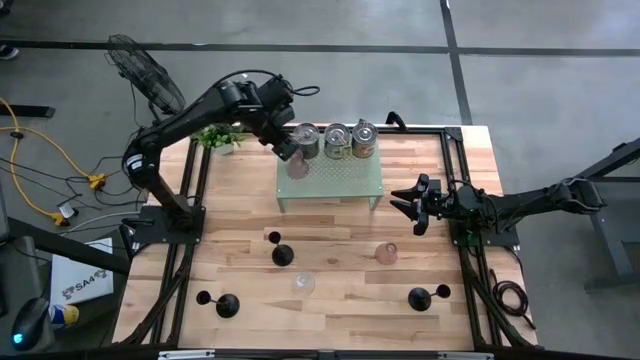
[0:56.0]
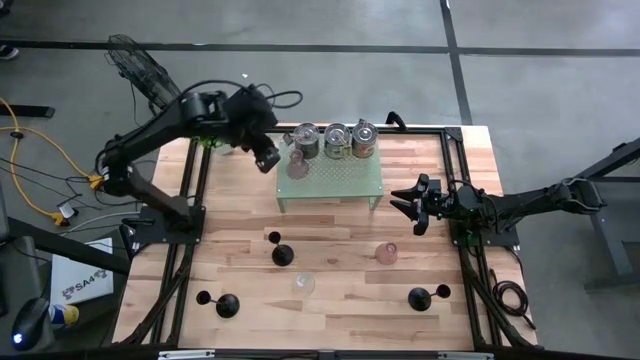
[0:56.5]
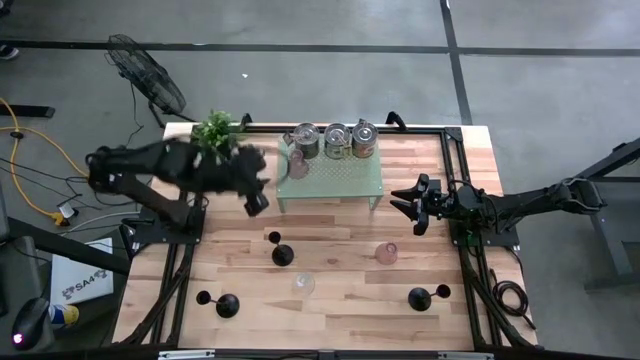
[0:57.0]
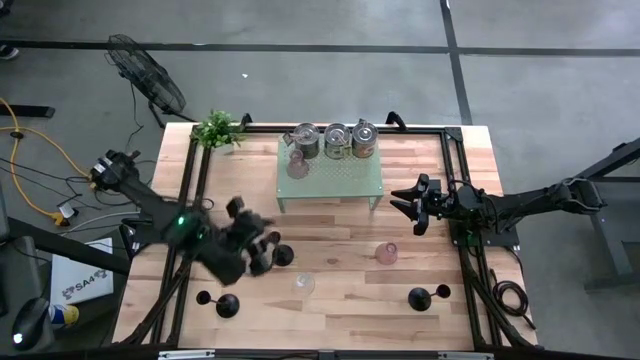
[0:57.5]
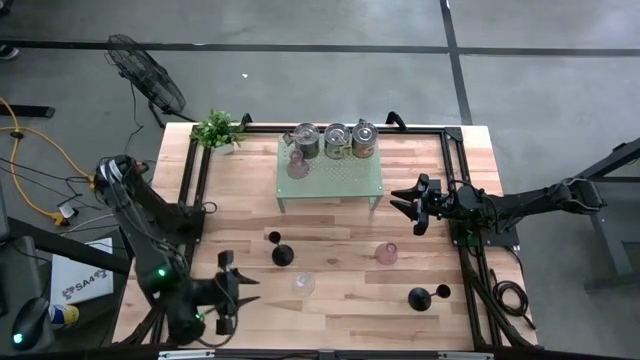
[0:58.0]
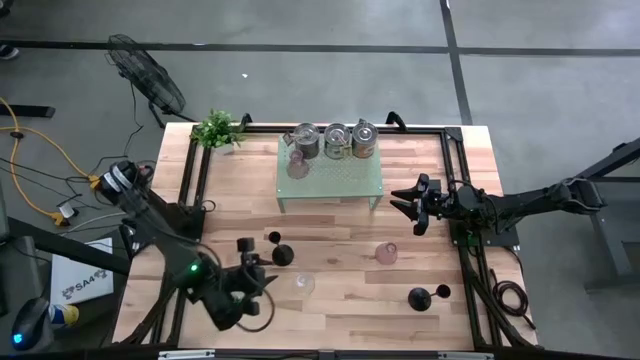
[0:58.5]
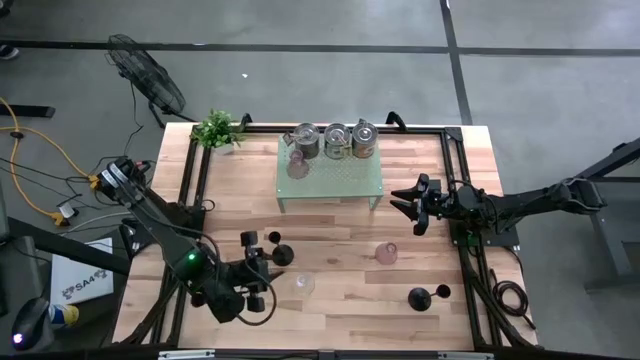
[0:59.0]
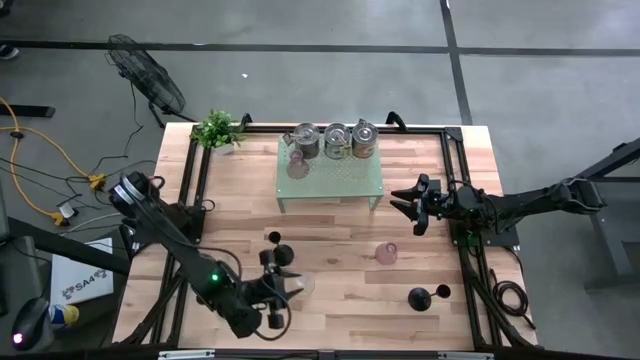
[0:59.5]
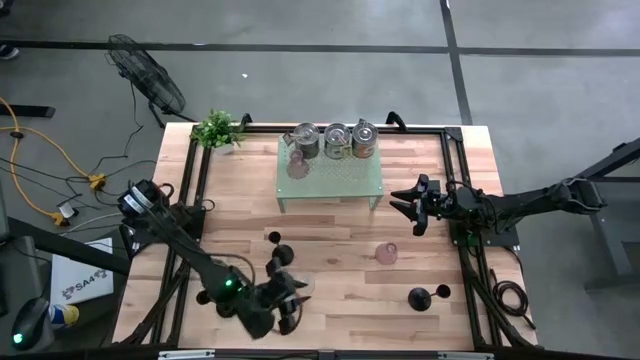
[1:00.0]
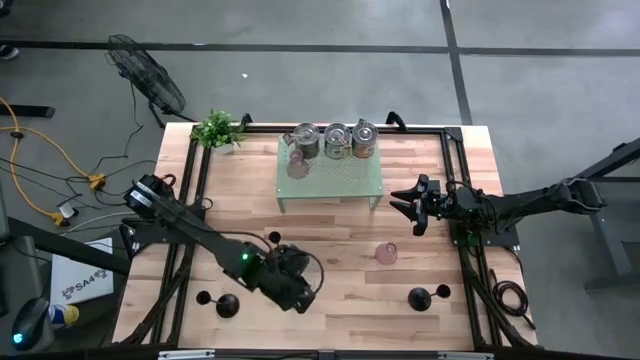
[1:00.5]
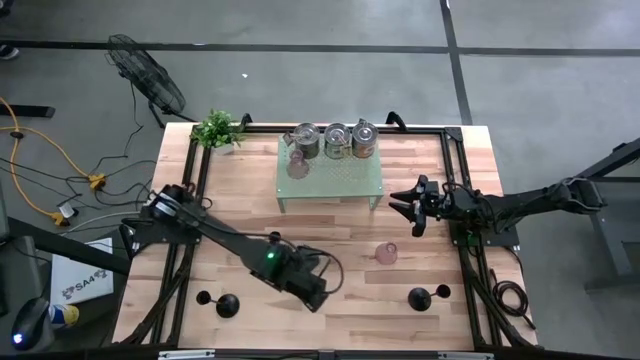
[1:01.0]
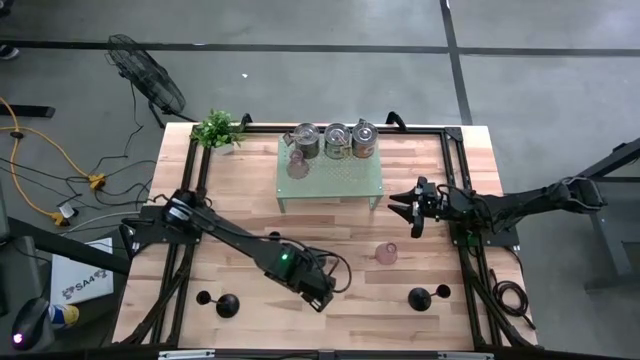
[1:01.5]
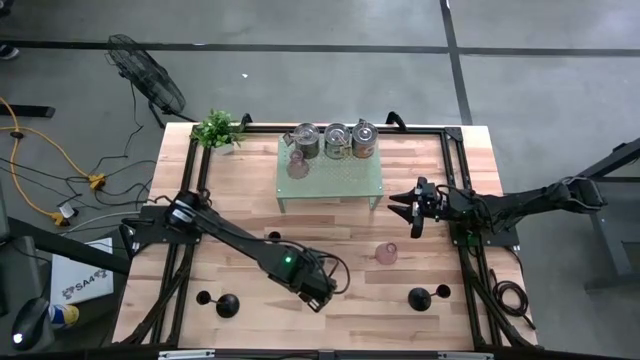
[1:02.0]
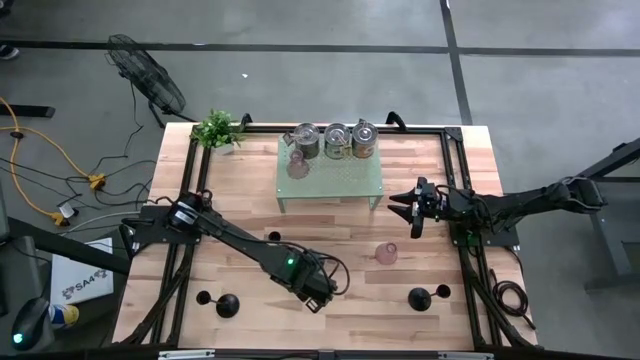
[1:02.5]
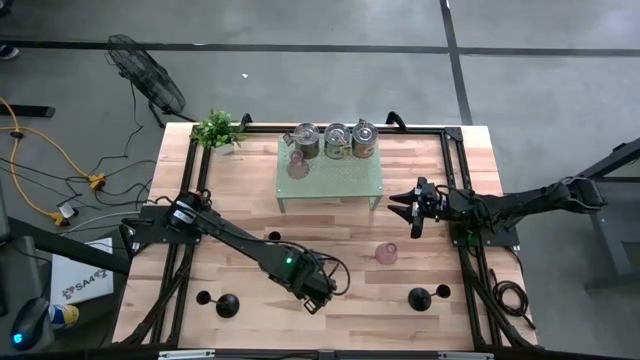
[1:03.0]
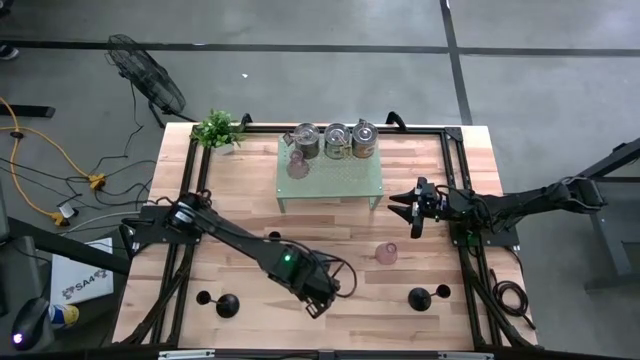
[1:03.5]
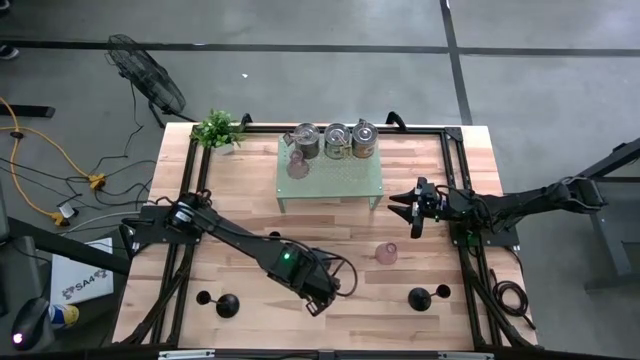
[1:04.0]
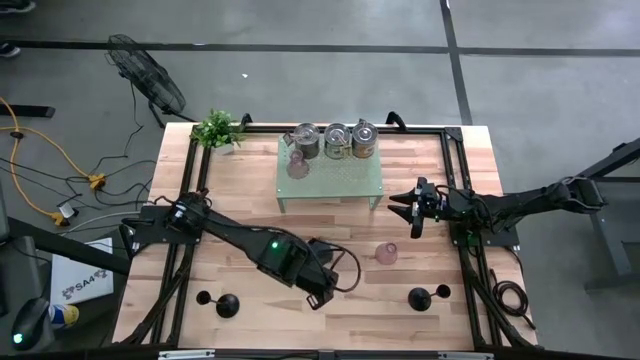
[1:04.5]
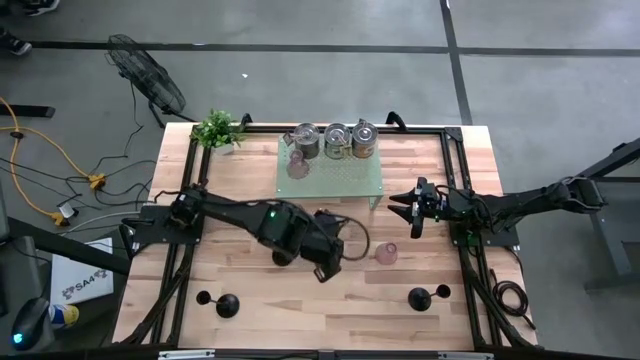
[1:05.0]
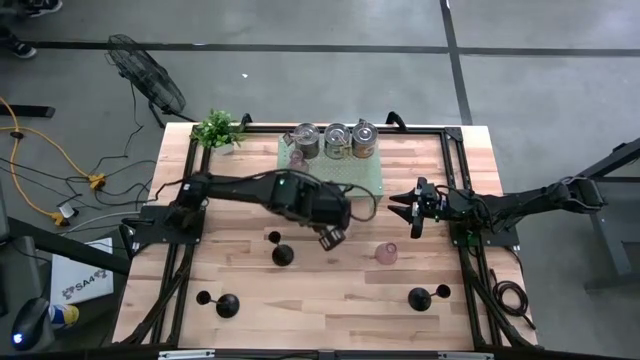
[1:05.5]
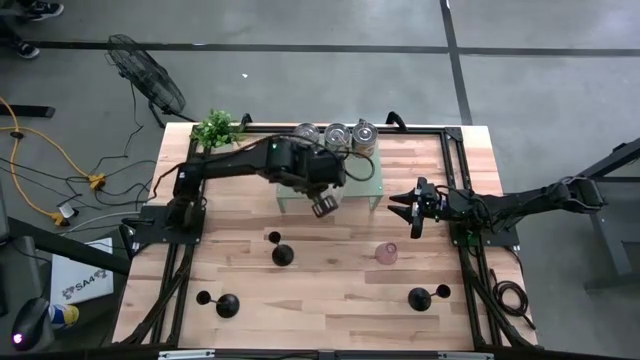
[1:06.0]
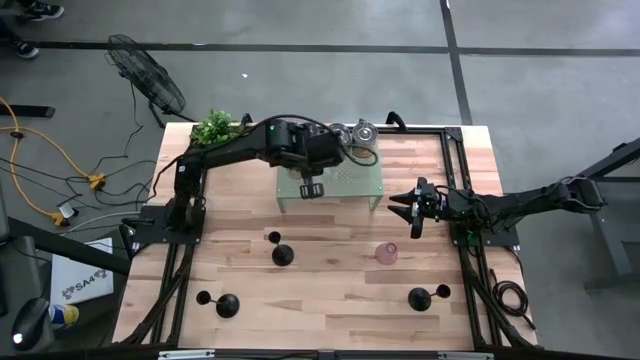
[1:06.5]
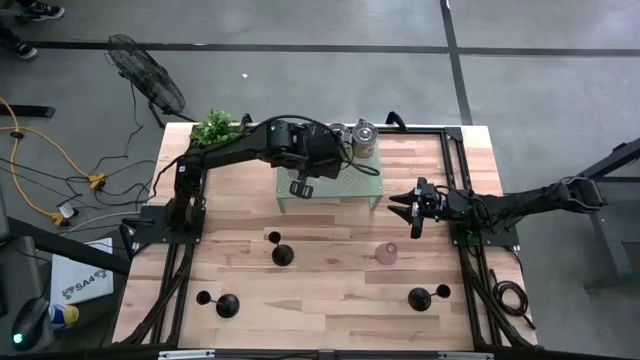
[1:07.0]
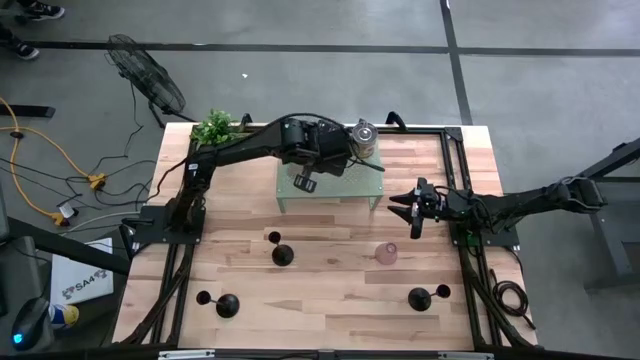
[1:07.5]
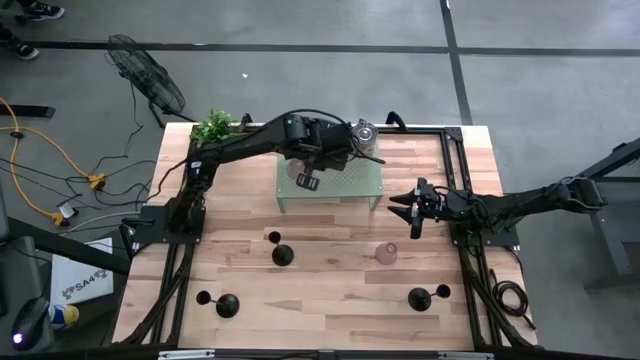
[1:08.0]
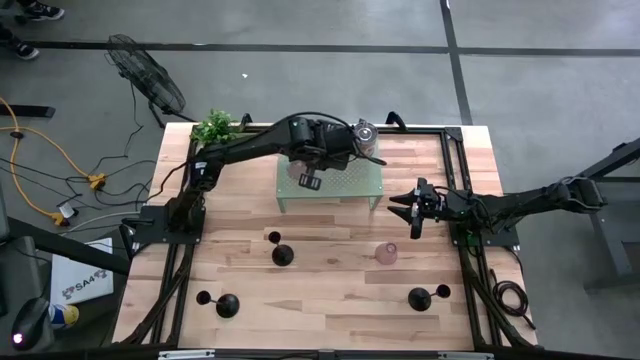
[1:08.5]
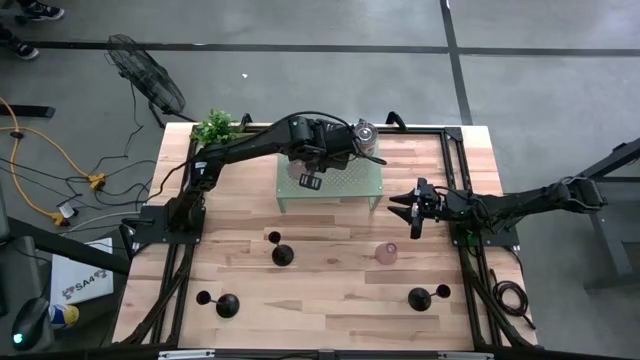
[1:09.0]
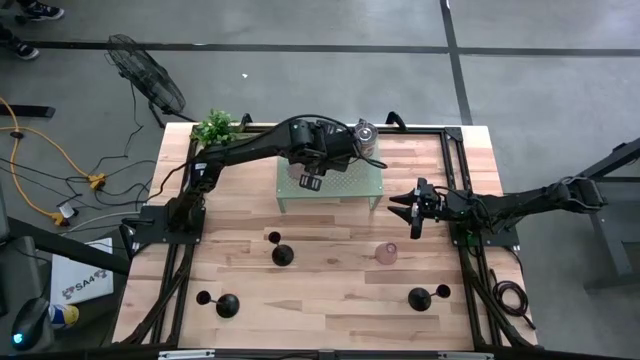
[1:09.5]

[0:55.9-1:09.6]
Task: Pick & Place candle stick holders
Put the transparent candle holder on the shelf aligned with the pink candle holder

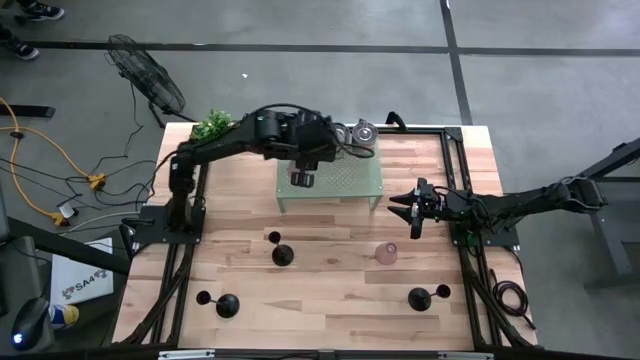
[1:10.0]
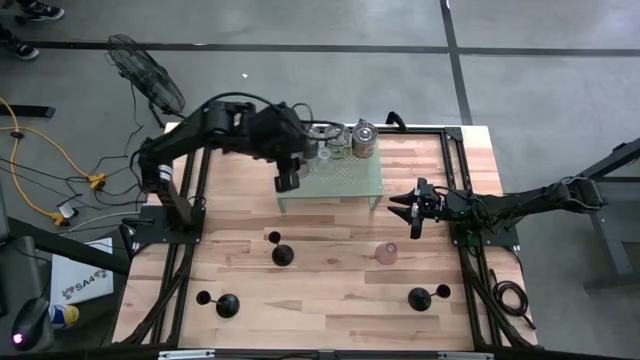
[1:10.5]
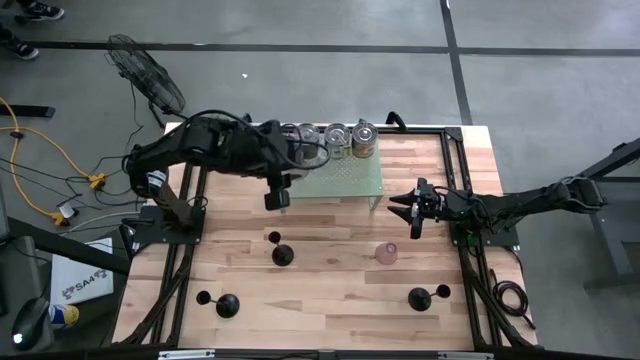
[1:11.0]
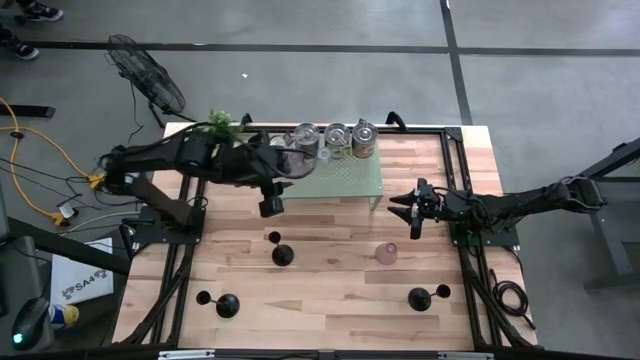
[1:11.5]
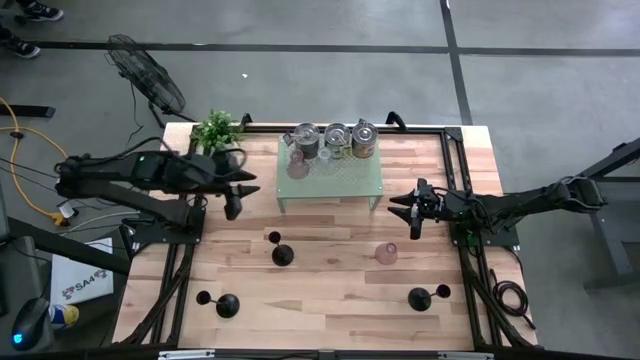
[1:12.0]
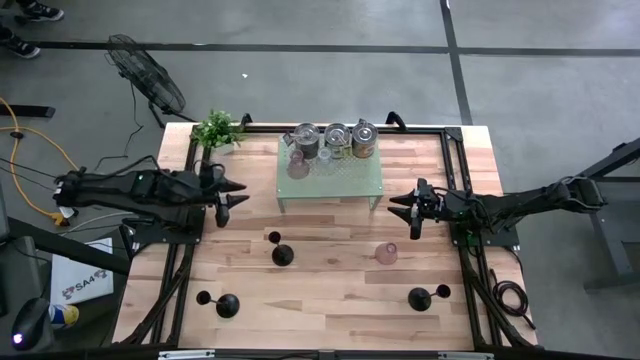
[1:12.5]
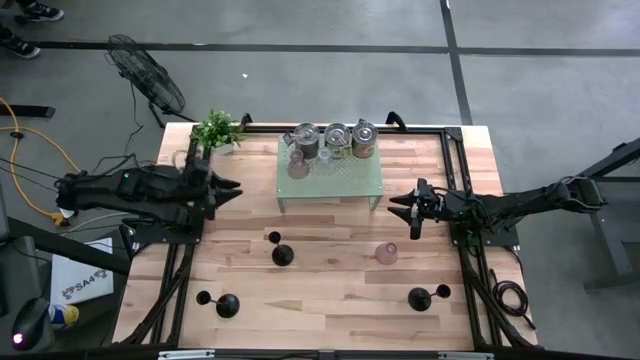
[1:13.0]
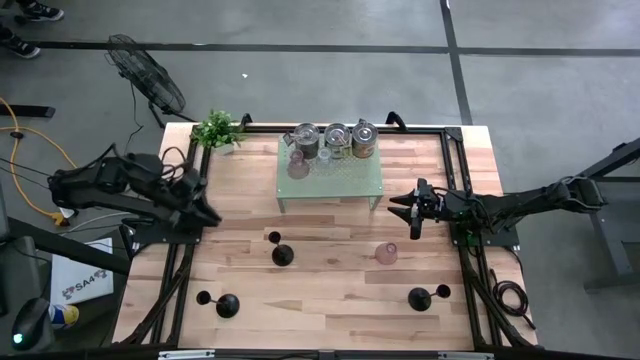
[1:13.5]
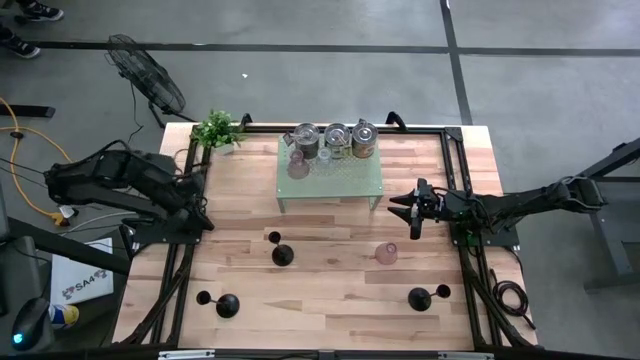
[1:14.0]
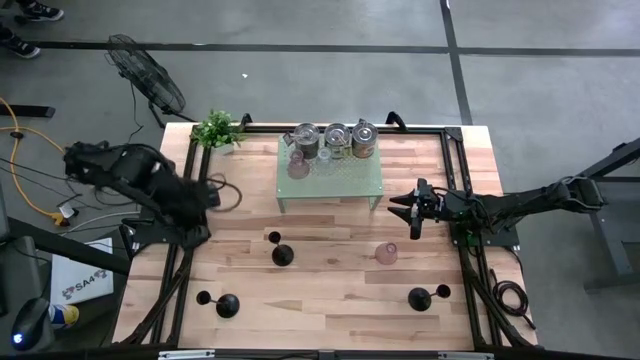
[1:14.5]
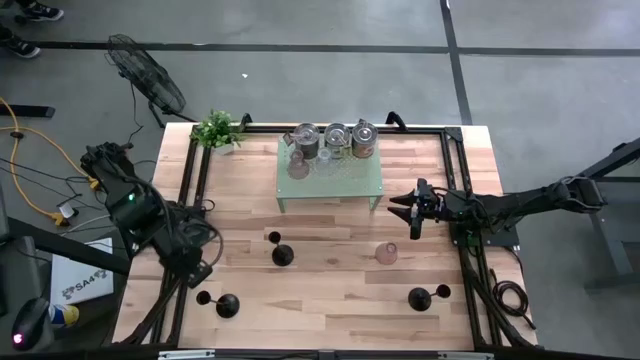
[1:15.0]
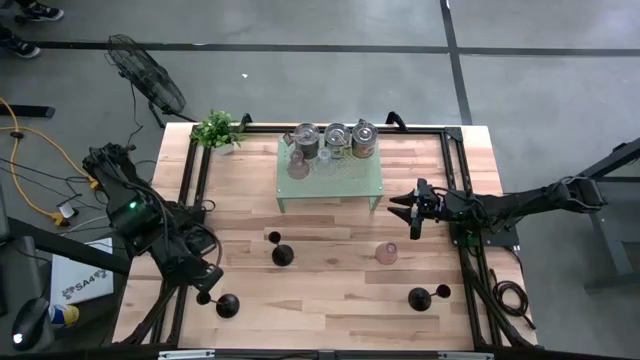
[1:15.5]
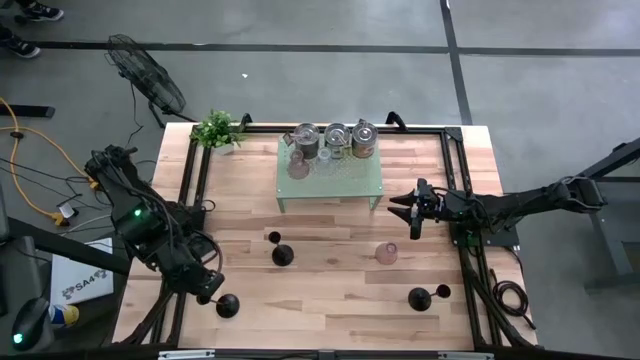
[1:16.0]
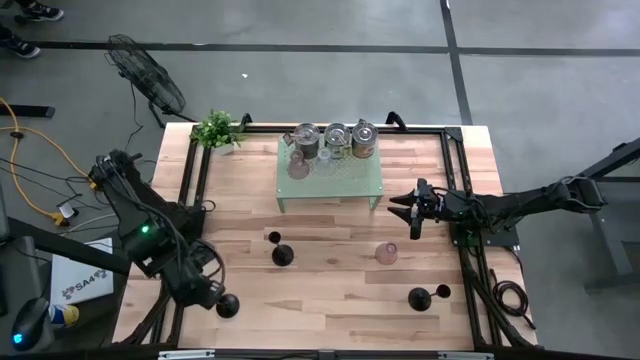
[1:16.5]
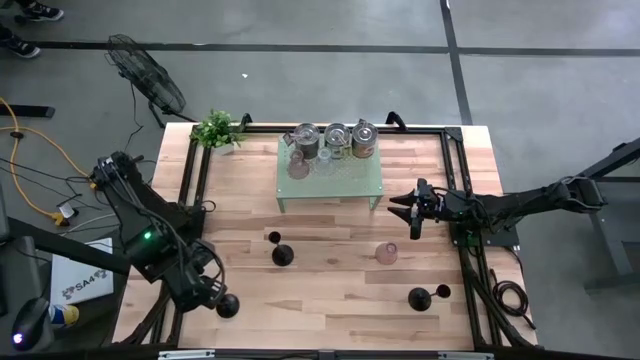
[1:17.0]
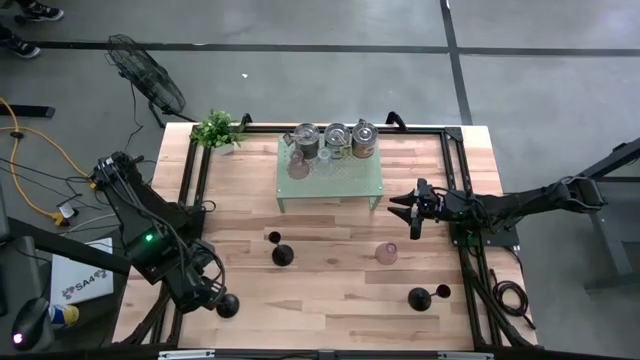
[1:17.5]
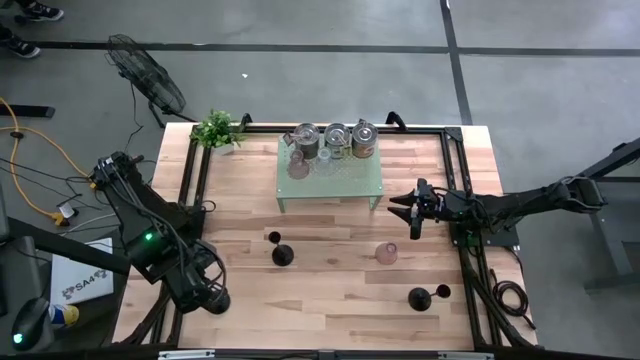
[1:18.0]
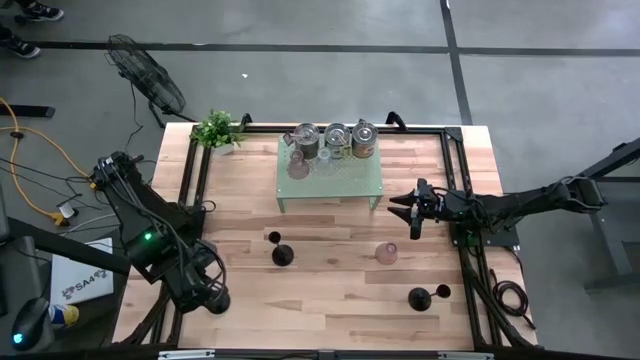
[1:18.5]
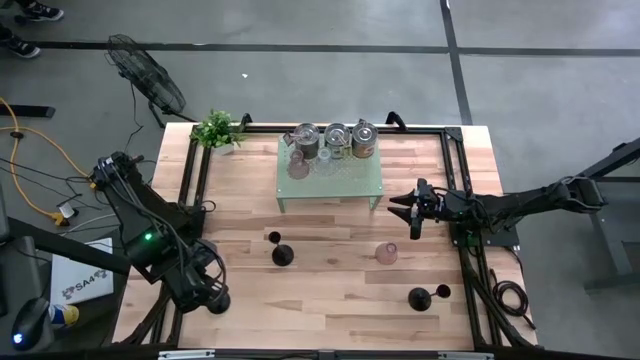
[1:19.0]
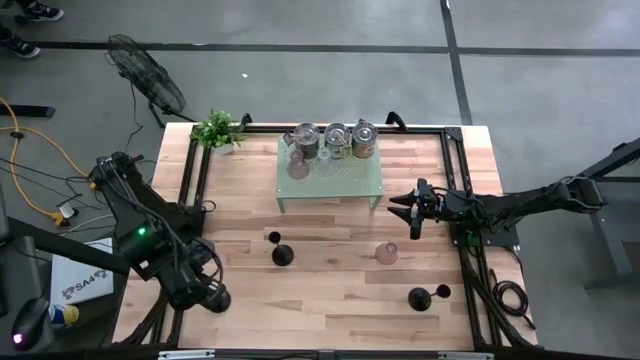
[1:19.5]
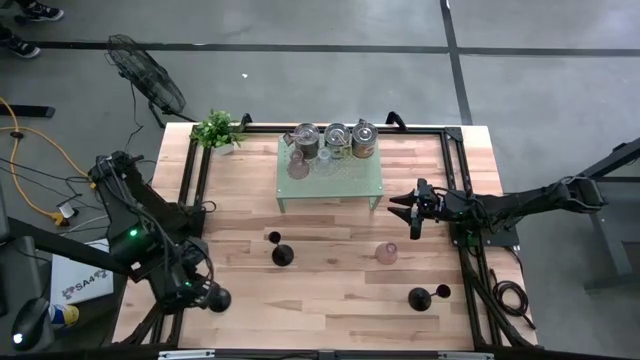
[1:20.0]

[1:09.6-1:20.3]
Put the bottom left black candle holder on the shelf
